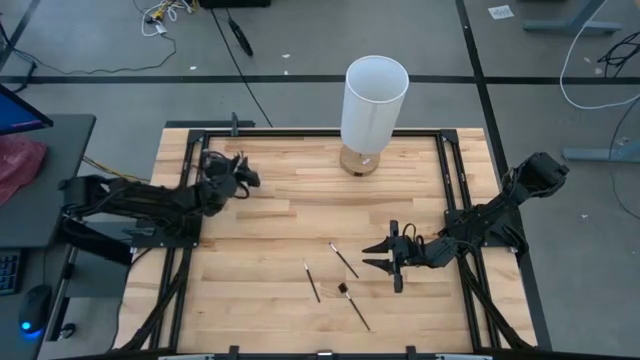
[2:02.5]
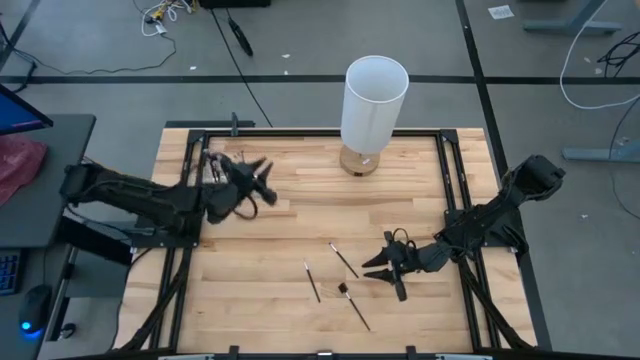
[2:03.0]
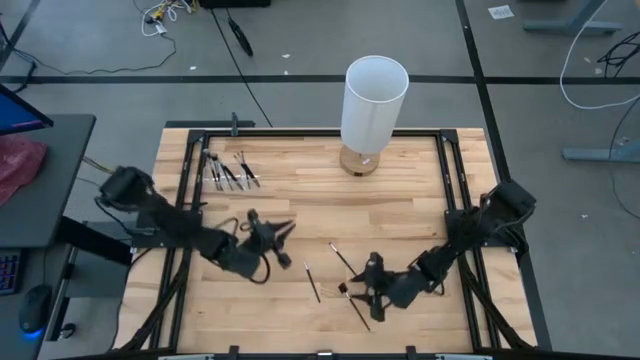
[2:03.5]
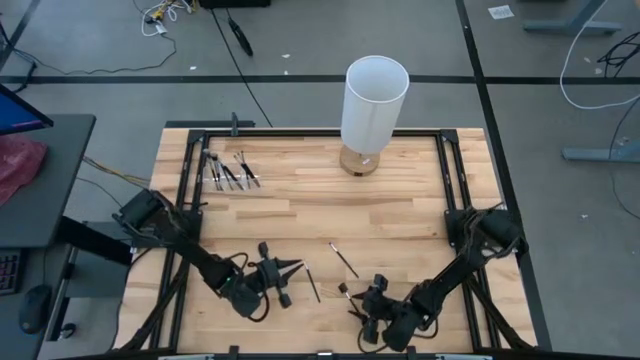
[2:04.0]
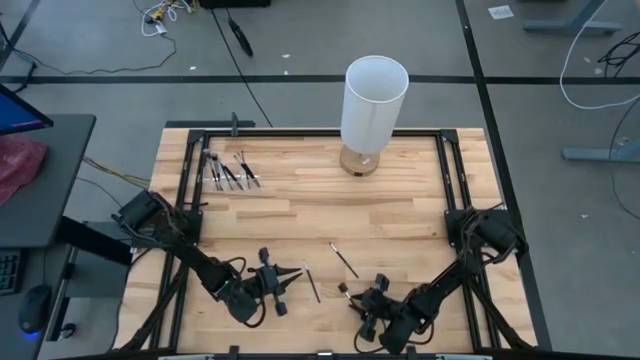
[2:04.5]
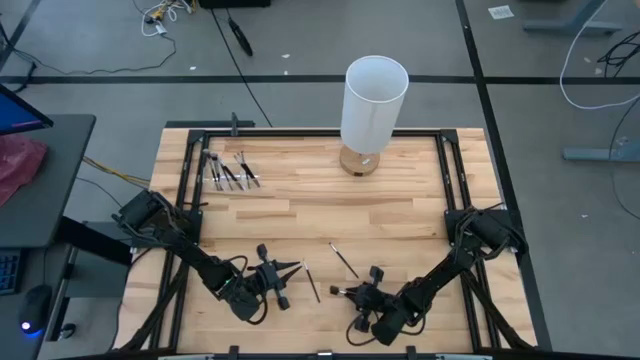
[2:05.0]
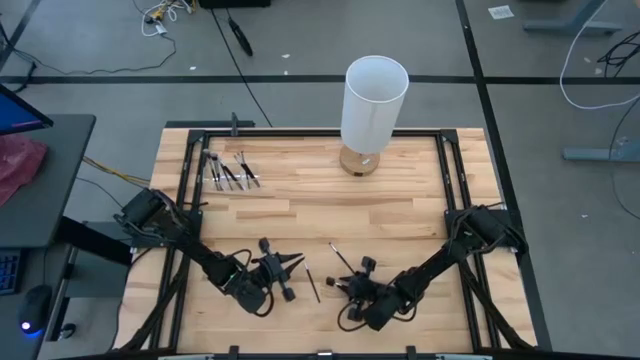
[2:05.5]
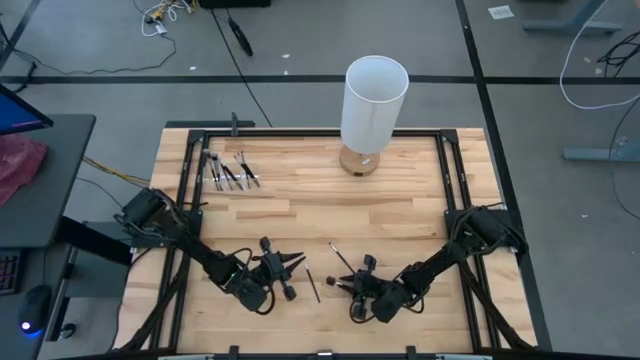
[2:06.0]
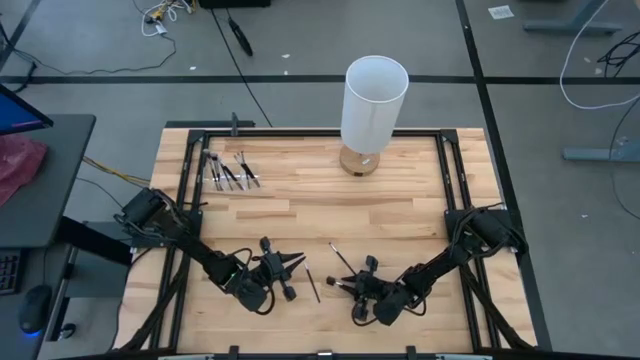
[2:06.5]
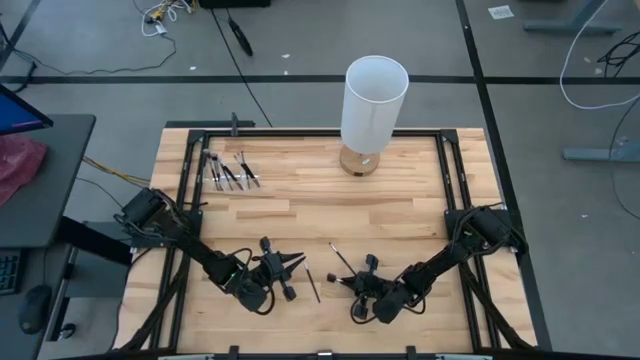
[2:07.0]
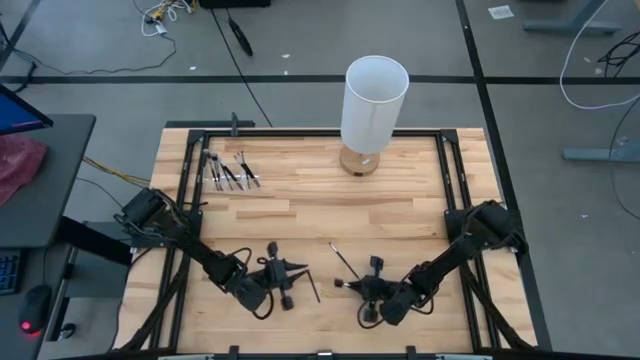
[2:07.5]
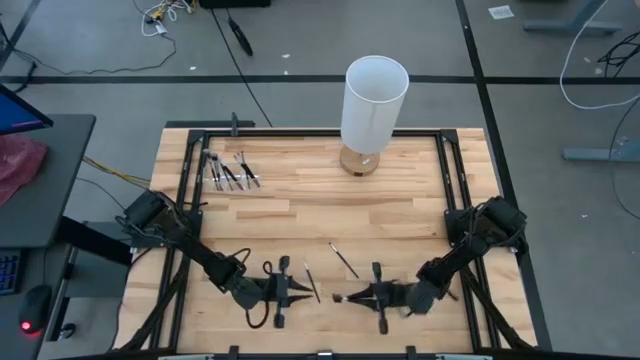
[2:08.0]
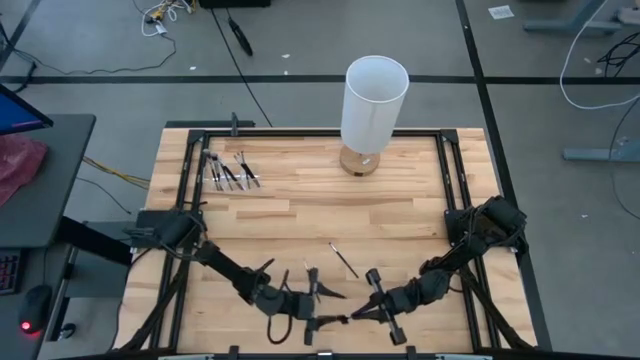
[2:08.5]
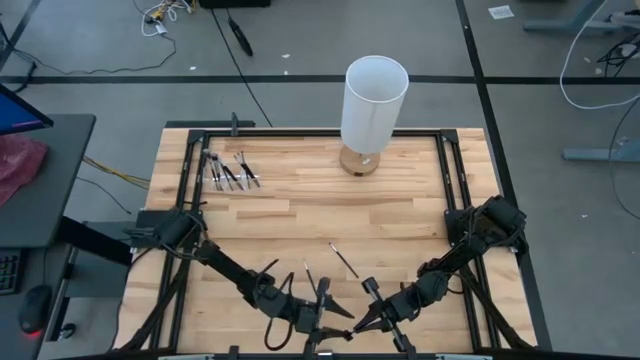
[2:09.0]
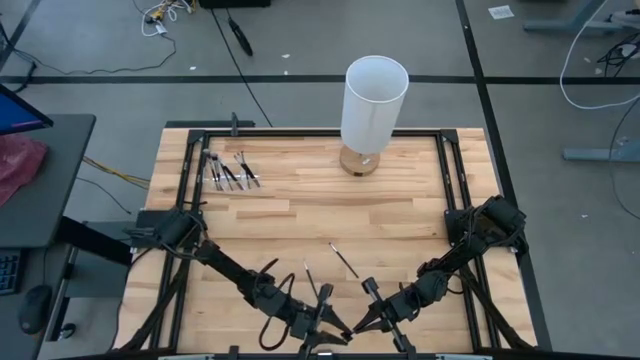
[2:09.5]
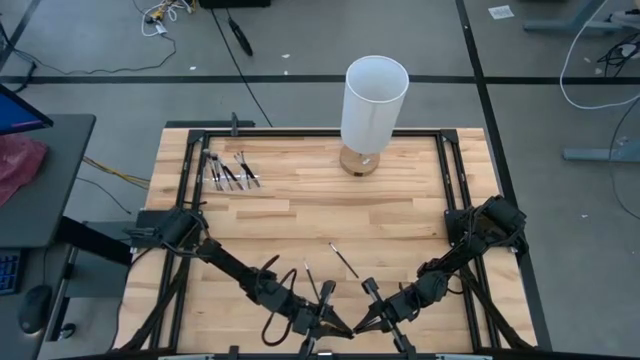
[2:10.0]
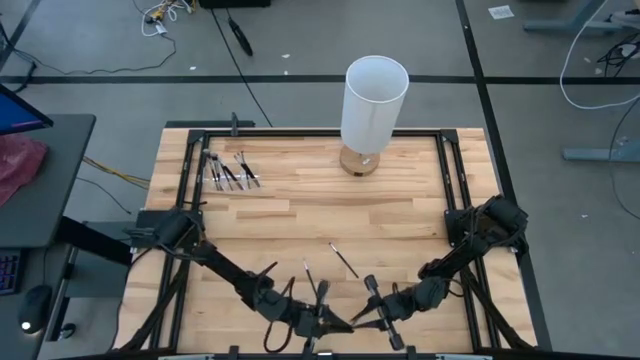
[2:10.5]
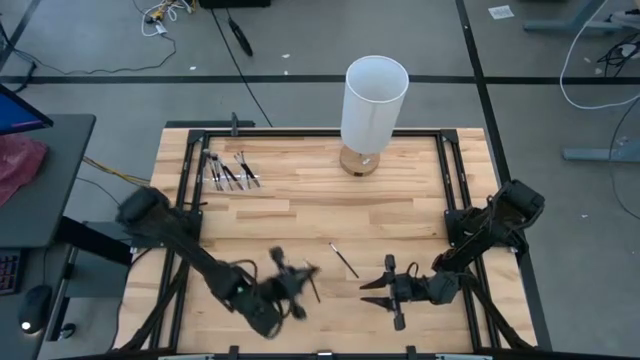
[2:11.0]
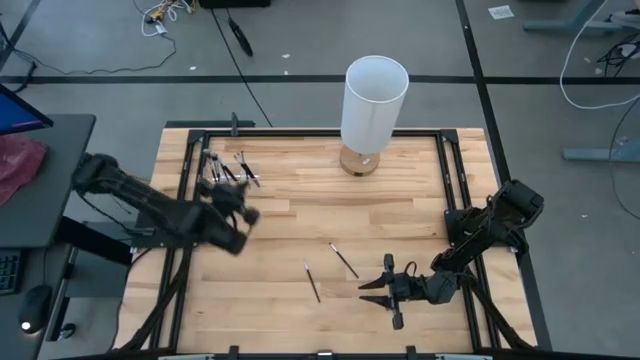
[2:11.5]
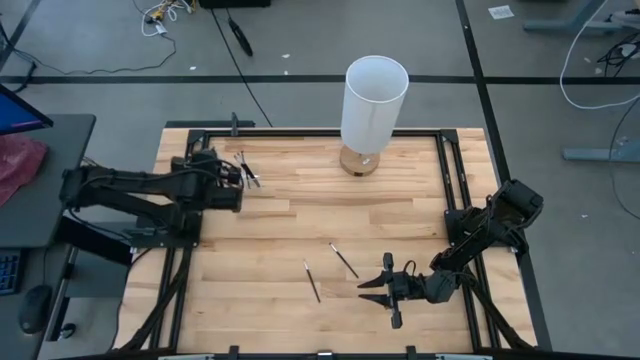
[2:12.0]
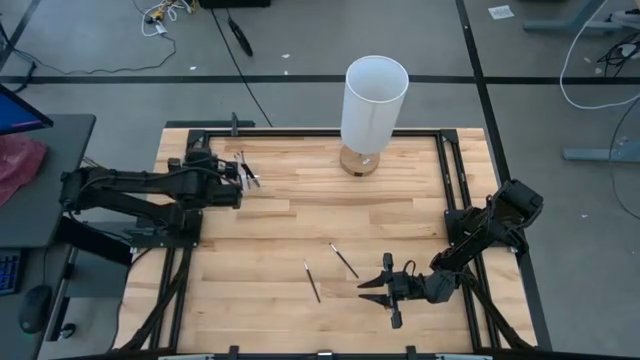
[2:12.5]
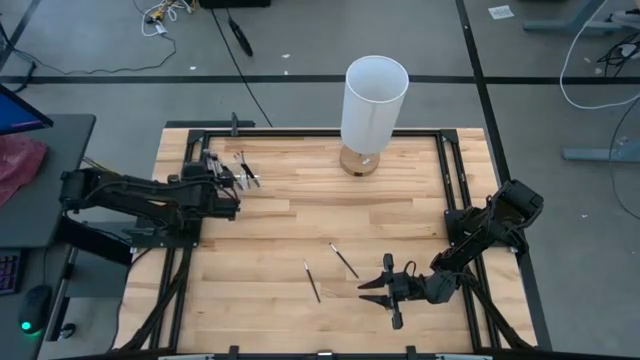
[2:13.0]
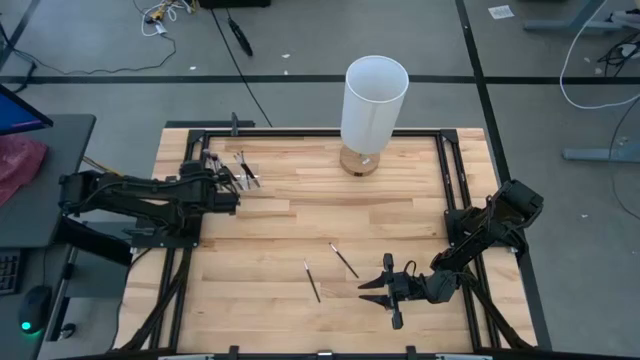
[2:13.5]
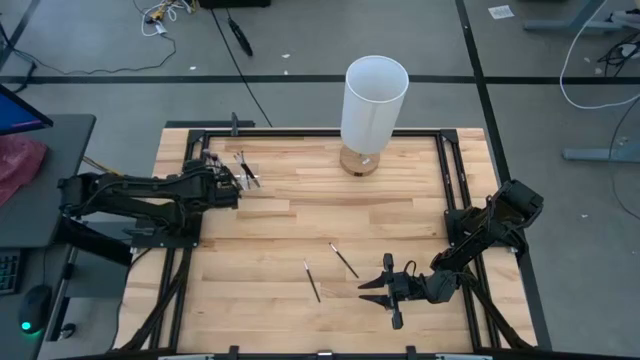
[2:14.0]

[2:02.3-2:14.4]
Task: Put items in baskets/containers
Put the black eye groomer brush into the transparent organizer

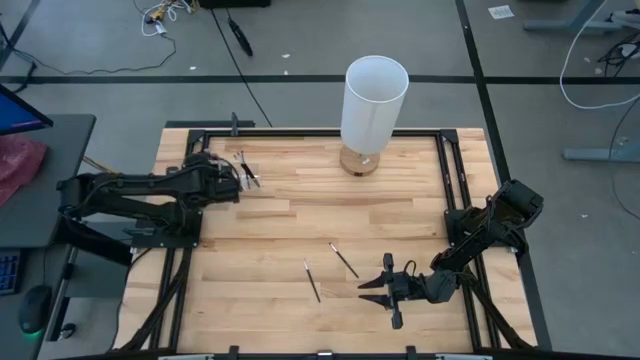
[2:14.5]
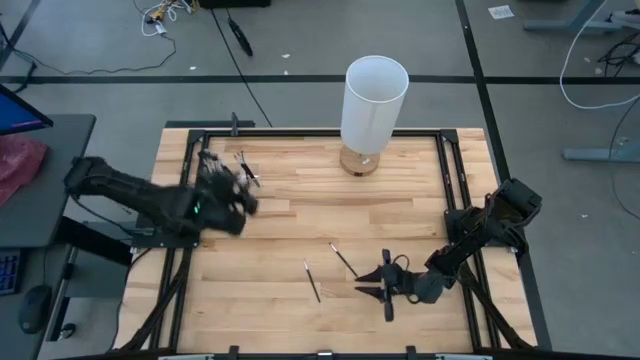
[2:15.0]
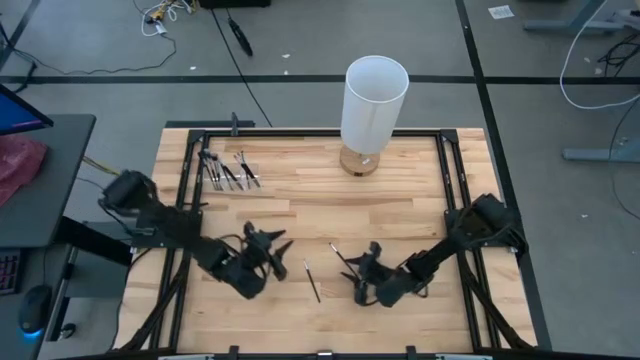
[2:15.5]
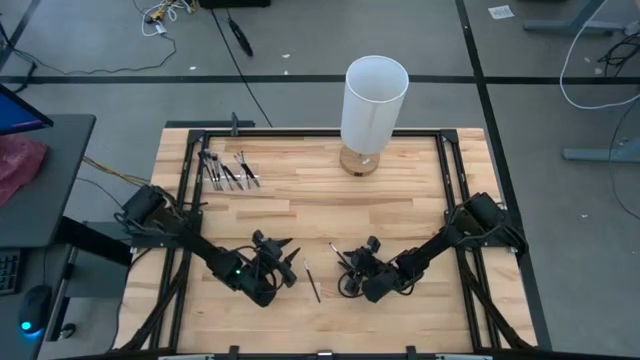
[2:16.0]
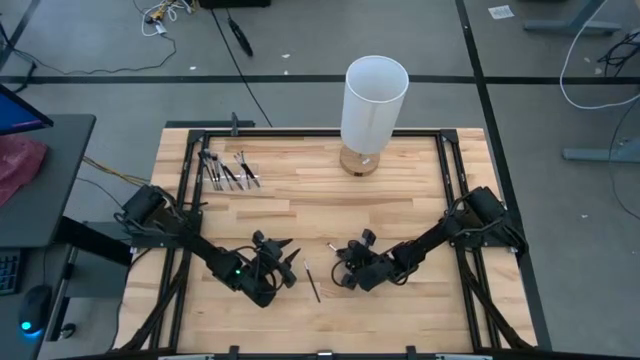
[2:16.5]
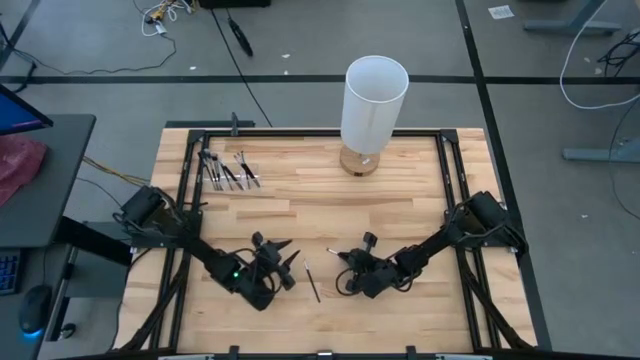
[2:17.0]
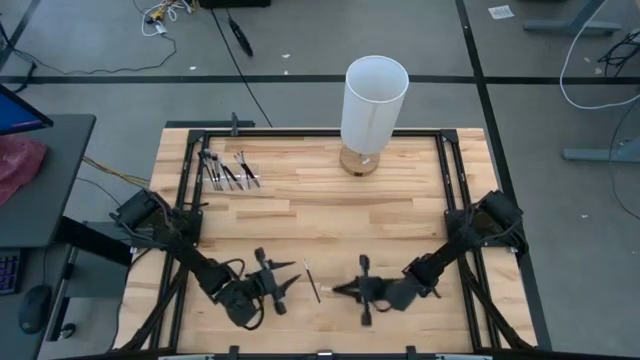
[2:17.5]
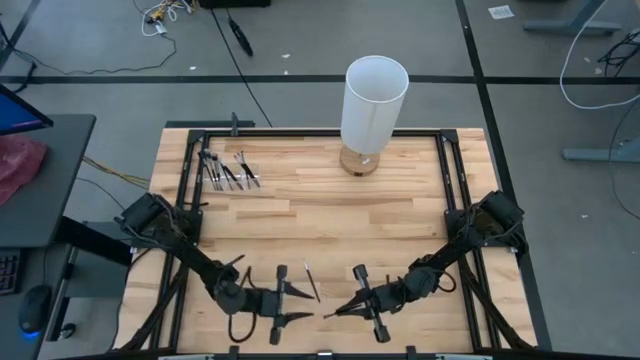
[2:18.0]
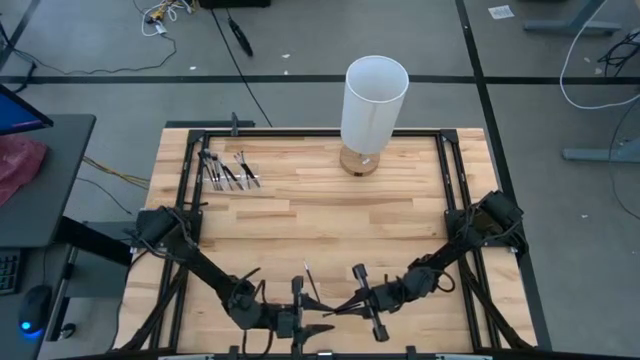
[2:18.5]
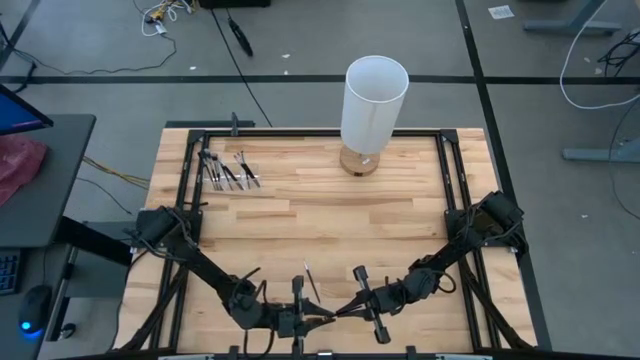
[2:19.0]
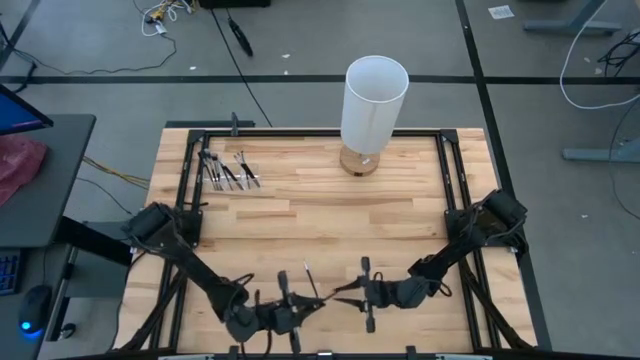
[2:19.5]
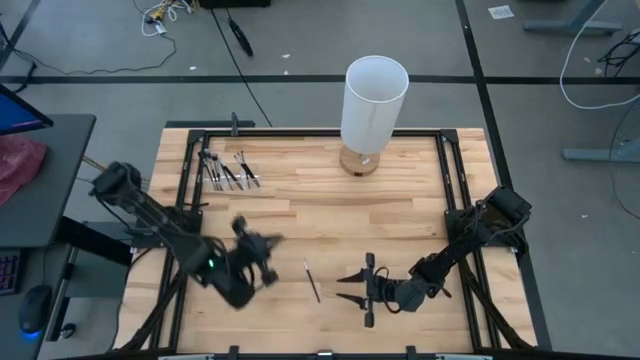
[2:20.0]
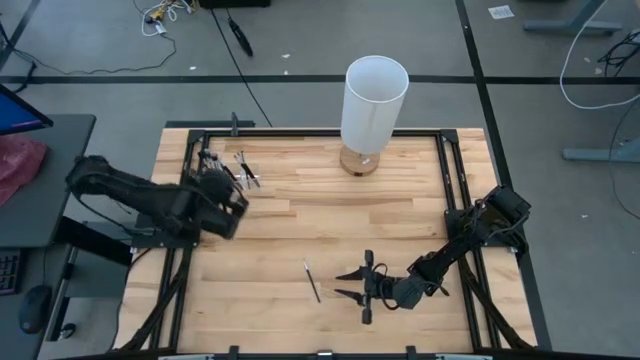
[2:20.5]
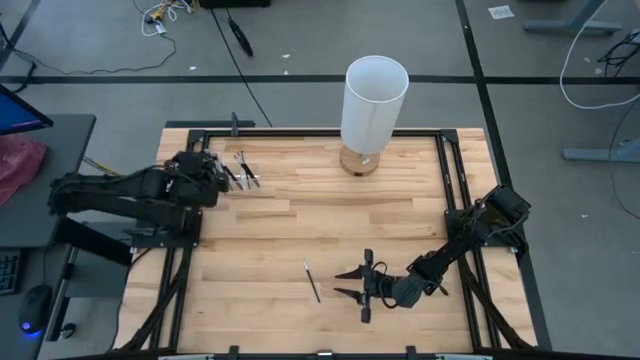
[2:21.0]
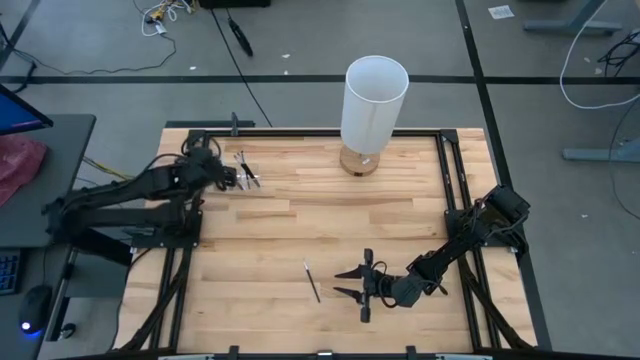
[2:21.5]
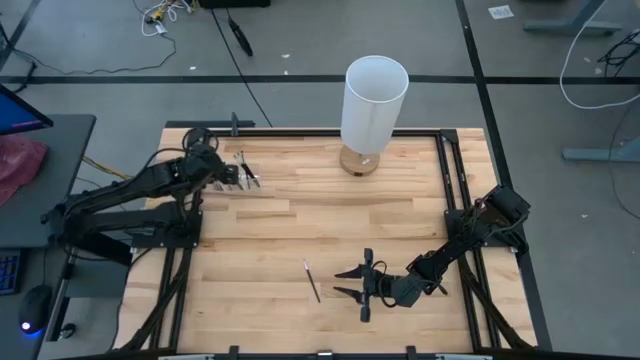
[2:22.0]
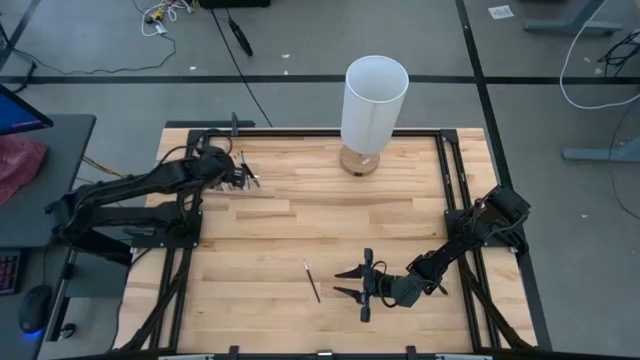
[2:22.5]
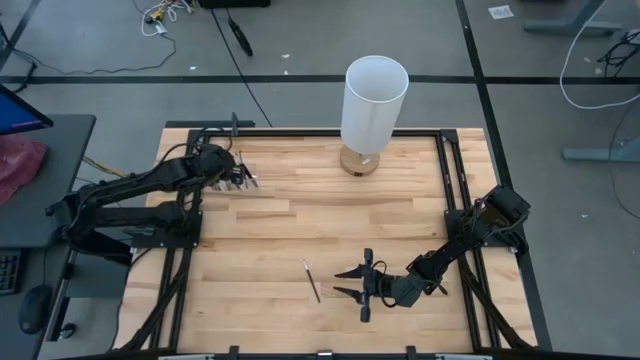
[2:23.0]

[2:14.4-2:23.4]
Put the black eyeshadow brush into the transparent organizer
